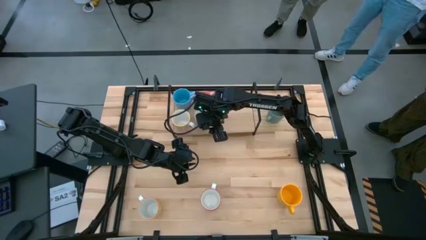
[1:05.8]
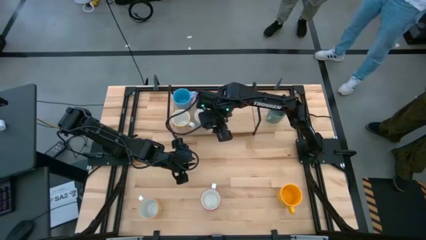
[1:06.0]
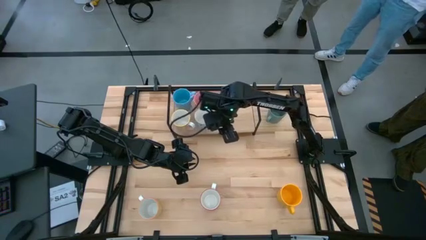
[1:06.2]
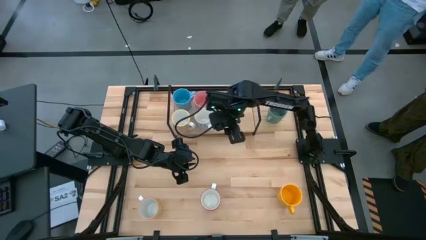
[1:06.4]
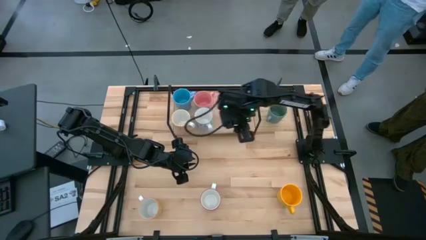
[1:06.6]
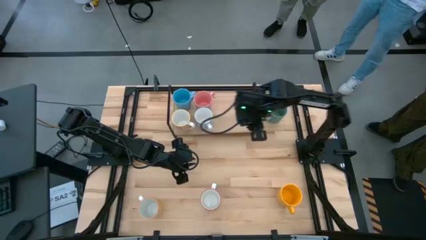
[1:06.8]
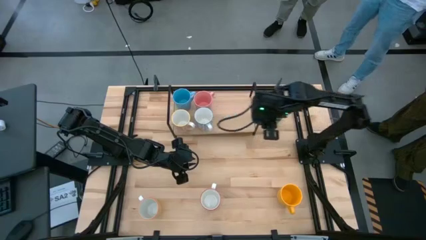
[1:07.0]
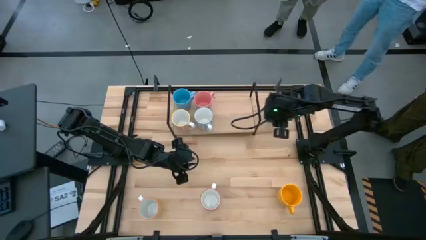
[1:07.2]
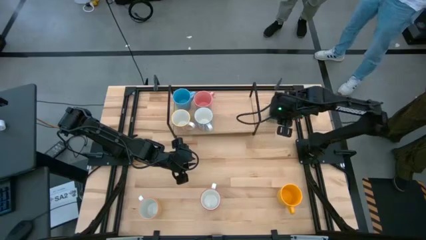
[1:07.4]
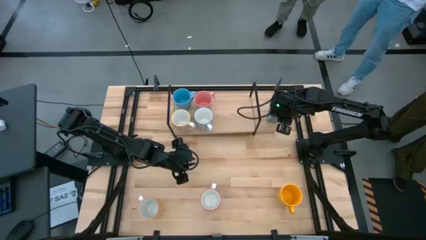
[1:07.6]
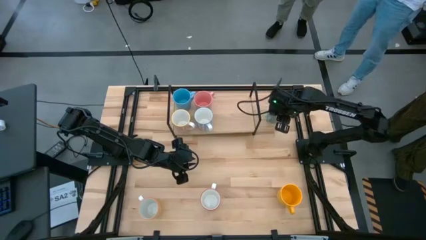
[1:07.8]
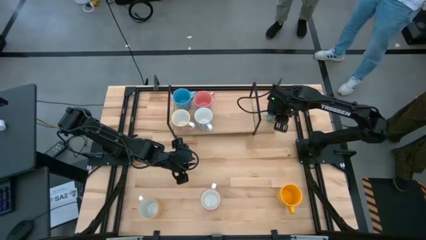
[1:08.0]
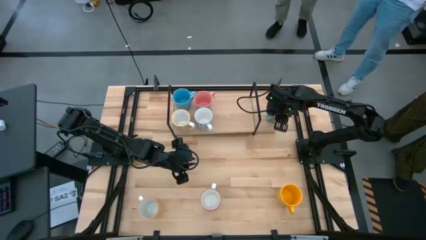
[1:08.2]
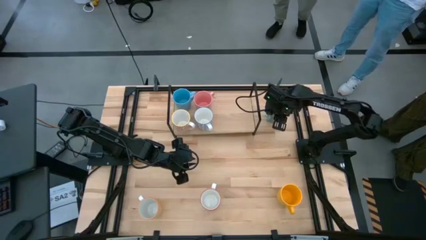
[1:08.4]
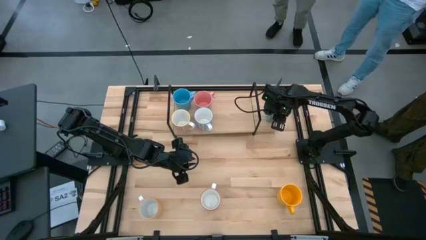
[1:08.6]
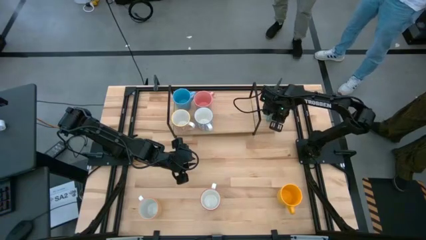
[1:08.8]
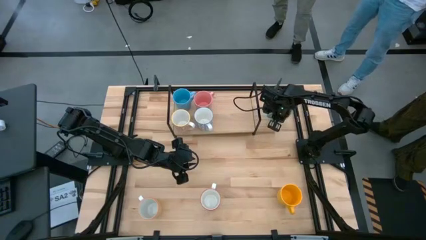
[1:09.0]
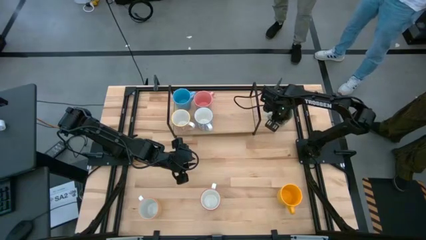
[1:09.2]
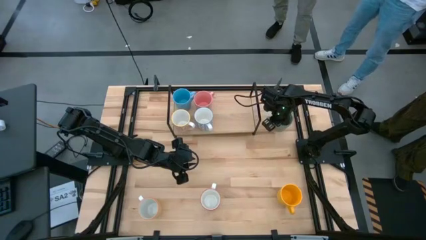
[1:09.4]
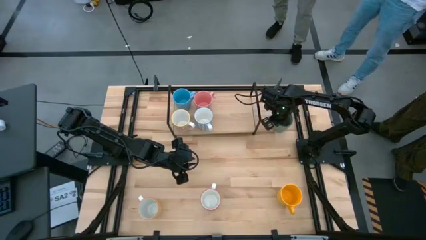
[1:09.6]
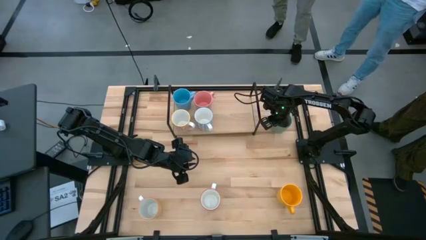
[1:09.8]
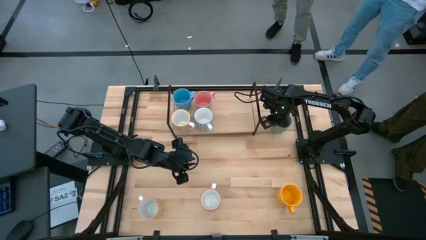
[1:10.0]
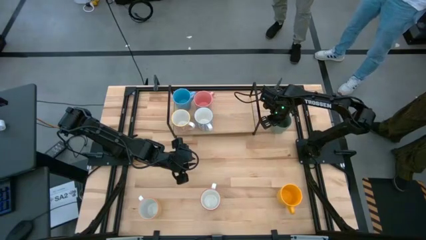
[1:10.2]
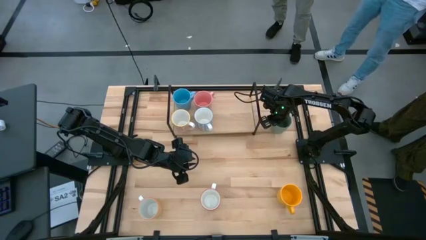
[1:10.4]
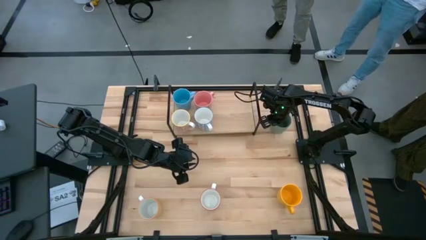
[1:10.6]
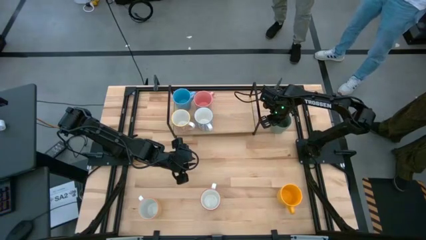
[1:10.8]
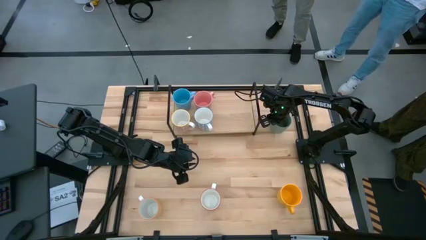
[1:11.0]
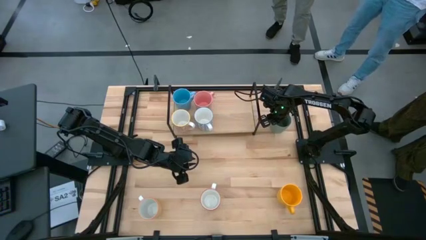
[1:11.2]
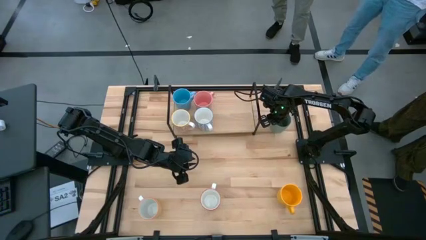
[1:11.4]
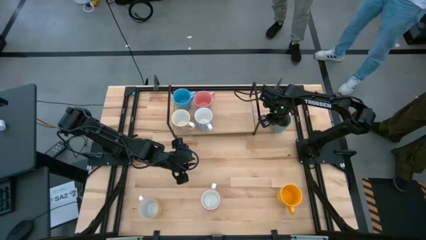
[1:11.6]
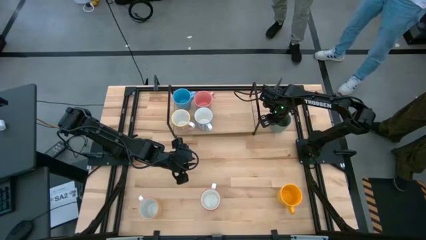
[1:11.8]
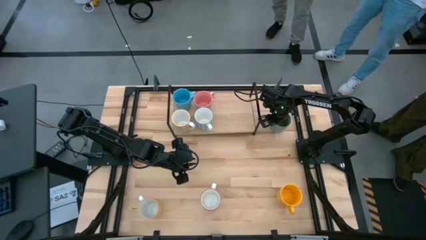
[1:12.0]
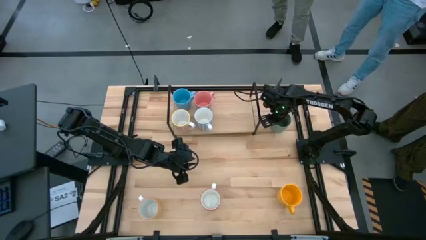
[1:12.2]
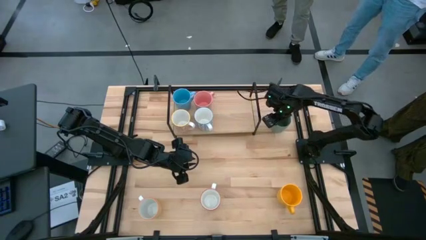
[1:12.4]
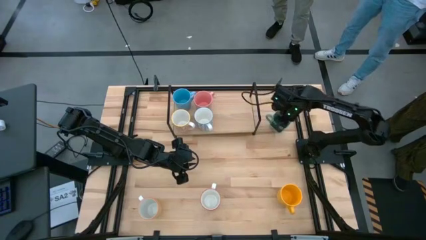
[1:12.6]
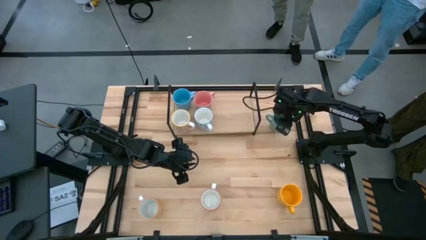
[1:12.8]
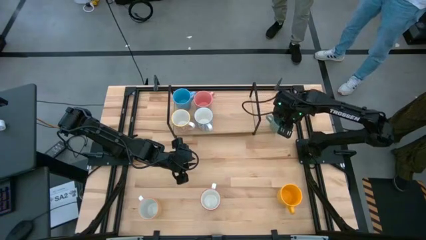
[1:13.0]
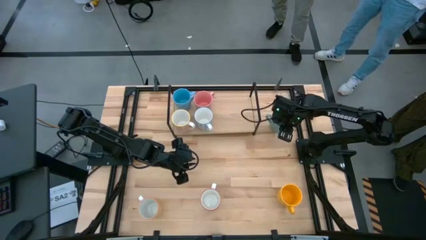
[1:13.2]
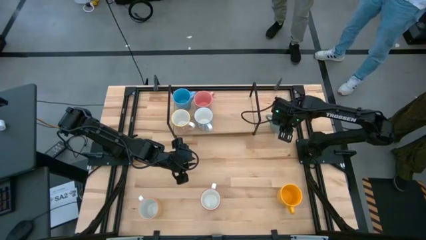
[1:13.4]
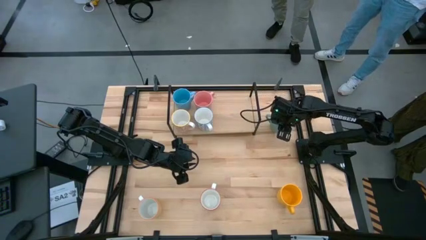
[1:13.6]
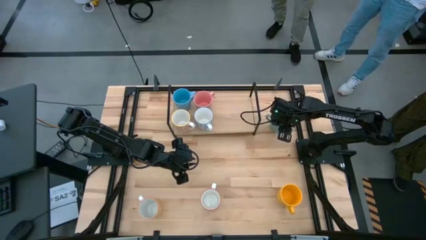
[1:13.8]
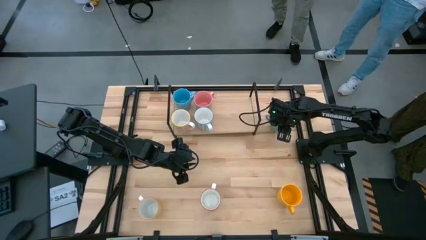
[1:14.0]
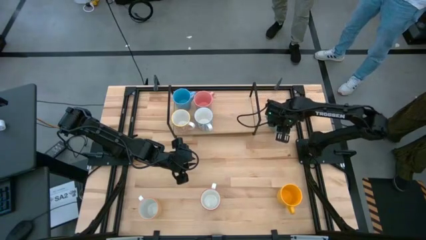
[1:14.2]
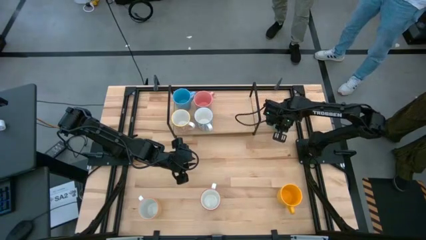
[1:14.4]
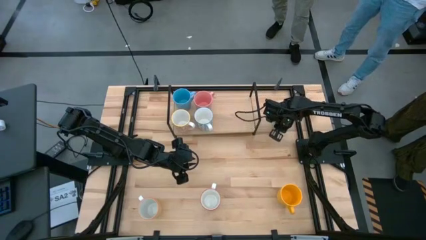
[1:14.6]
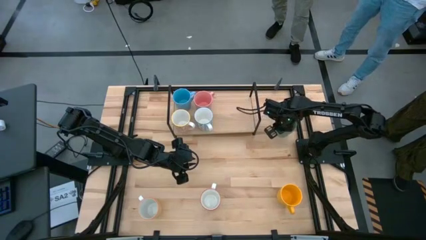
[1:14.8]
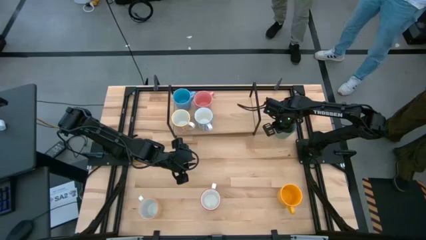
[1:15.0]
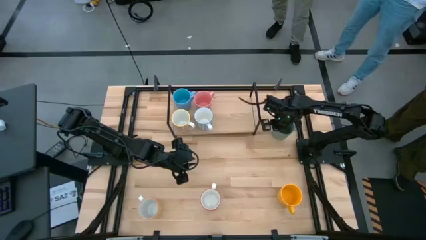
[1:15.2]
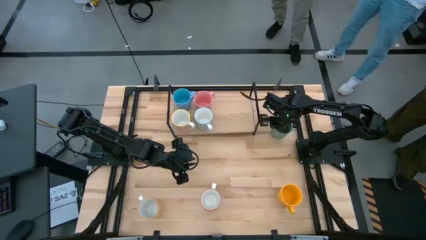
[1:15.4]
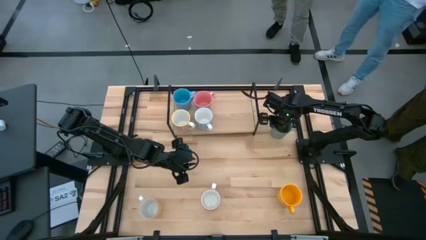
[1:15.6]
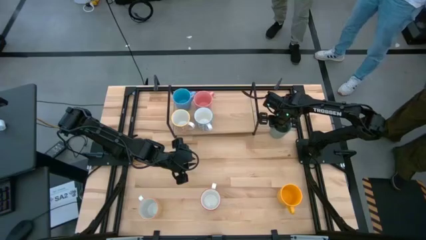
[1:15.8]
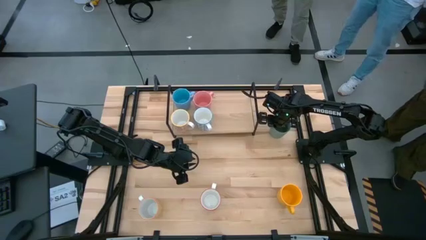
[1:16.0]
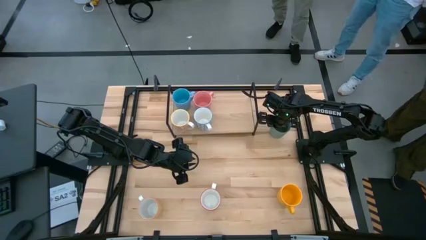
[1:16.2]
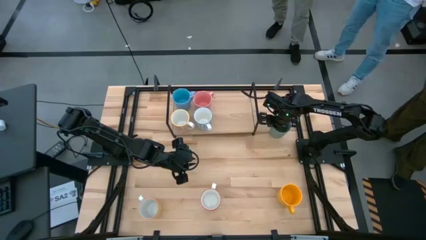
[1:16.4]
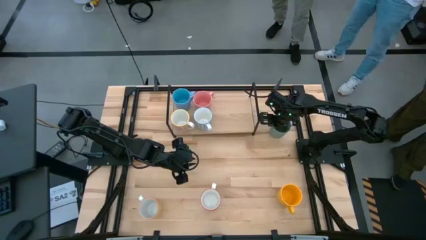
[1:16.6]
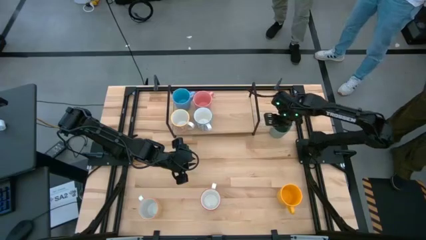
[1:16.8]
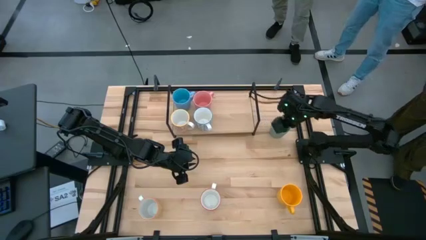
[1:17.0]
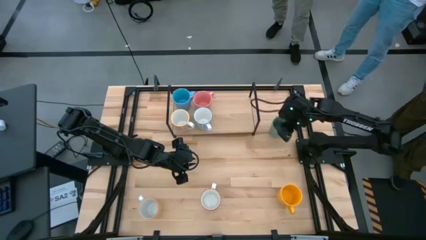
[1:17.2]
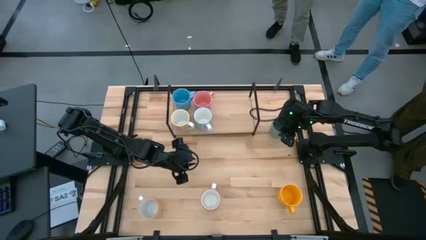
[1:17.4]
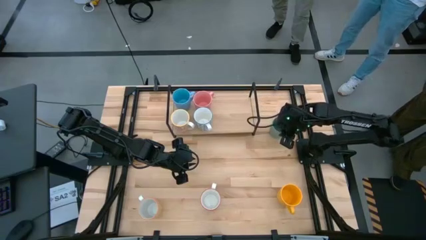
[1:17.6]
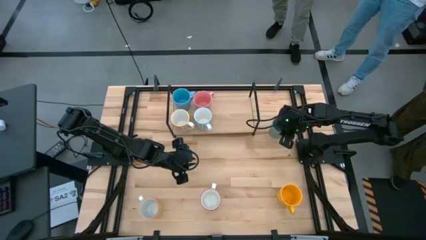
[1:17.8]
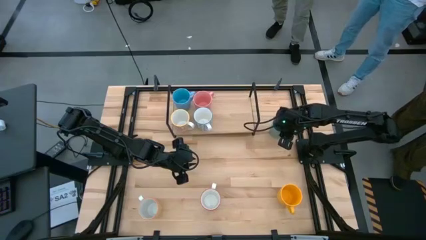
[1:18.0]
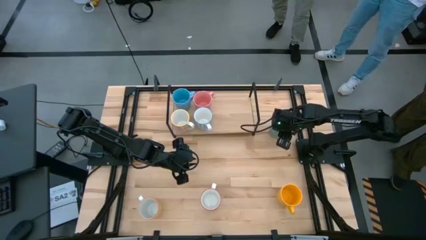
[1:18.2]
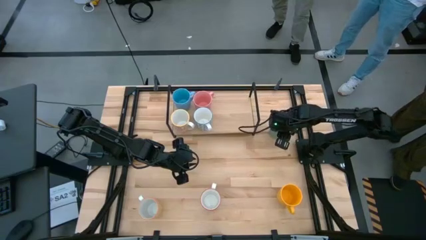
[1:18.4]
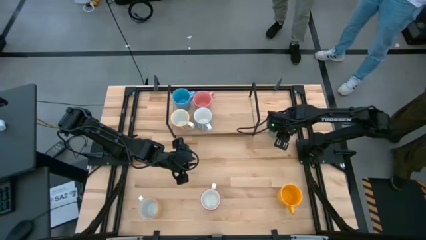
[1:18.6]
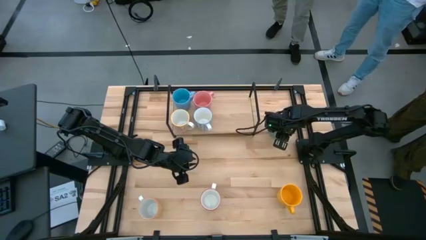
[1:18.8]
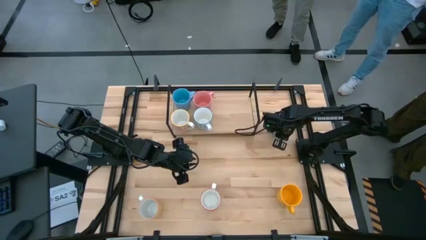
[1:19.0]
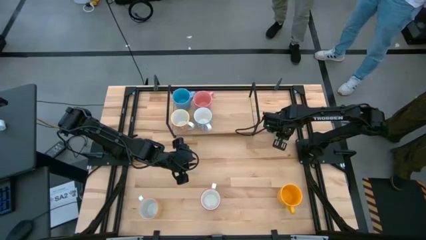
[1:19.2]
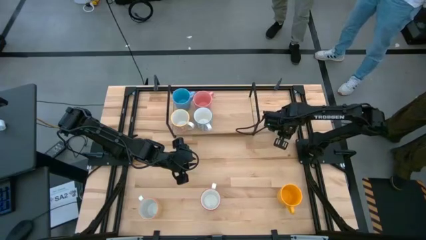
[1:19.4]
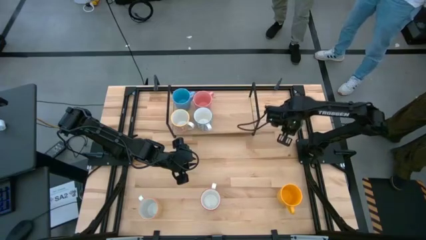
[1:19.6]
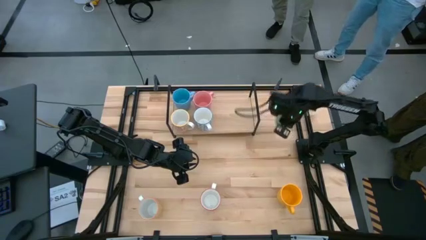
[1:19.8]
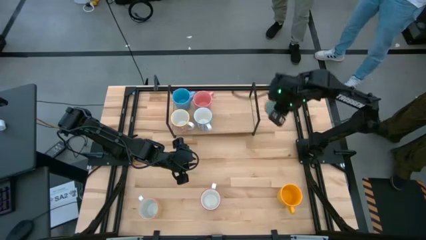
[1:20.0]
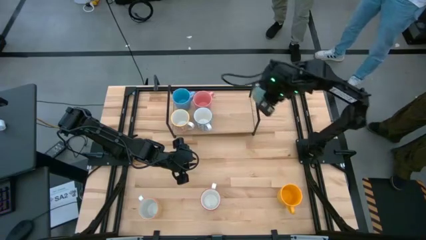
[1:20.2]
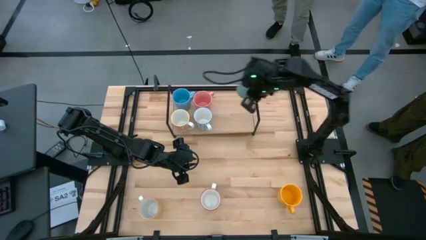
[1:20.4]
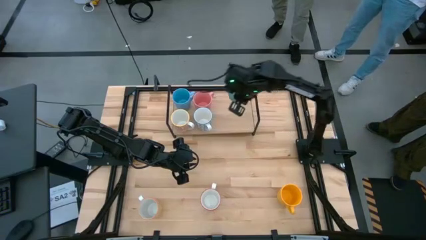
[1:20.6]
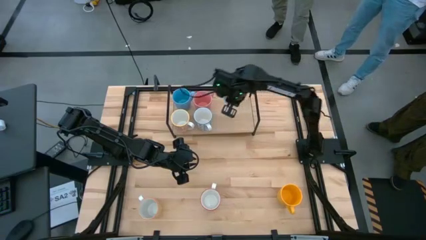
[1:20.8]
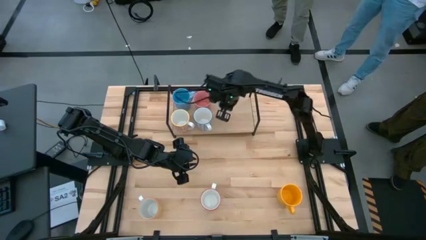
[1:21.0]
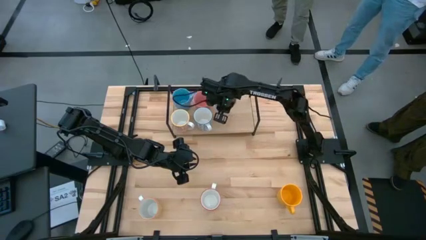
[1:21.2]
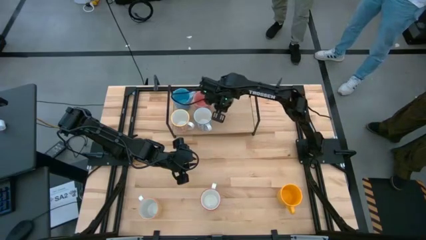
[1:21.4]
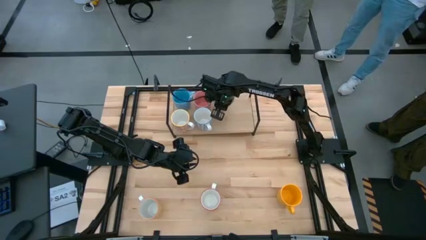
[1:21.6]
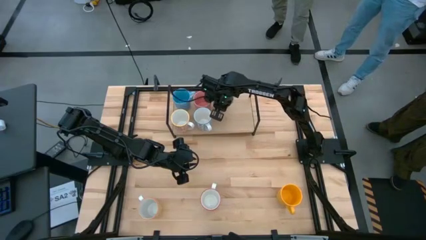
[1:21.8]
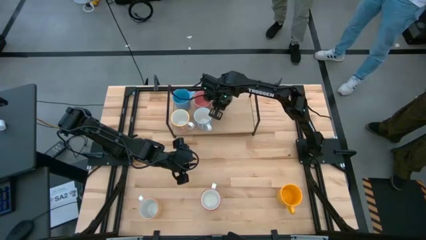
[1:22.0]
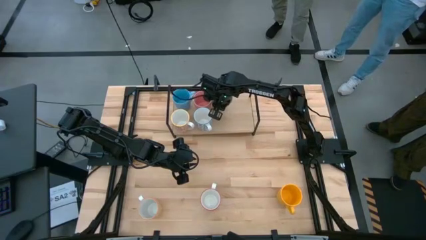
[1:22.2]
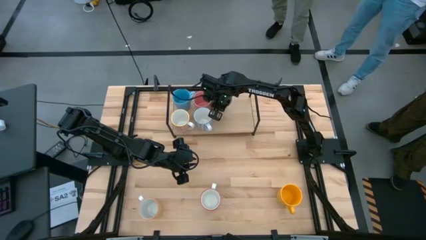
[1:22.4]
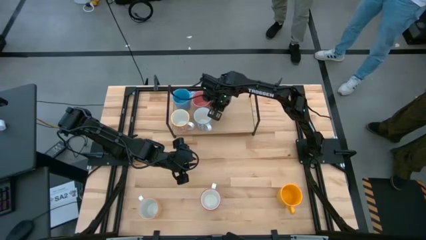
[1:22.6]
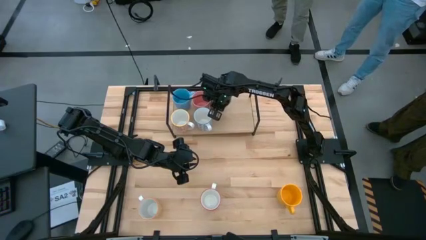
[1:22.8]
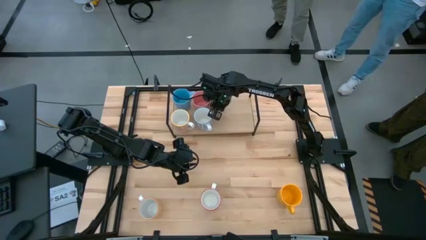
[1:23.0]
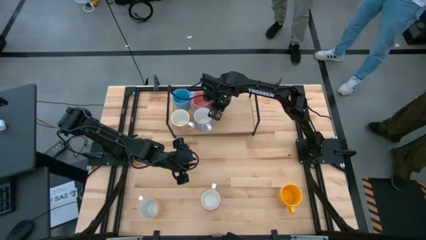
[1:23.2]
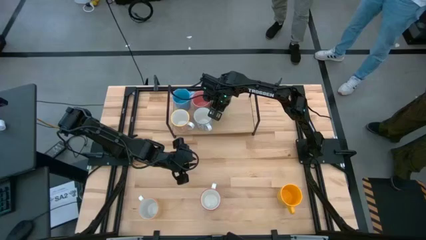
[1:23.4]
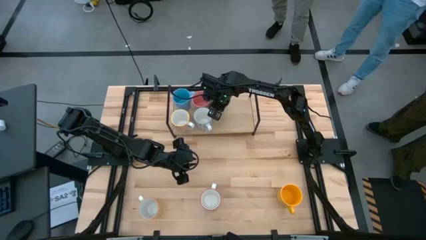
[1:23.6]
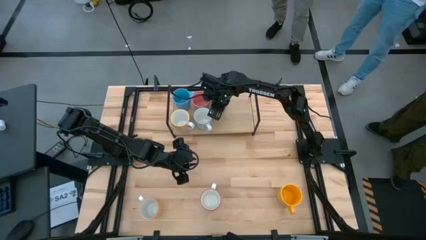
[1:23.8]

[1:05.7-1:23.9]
Task: Place coffee mugs
Put the green mug on the shelf
